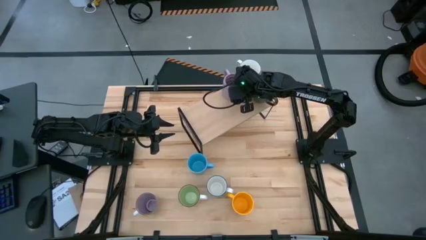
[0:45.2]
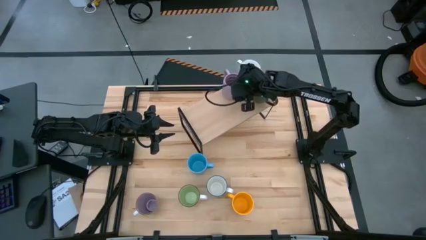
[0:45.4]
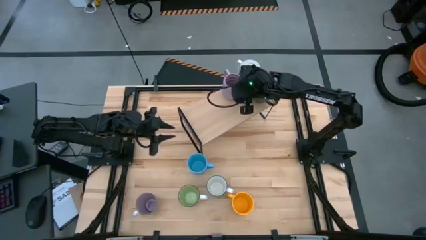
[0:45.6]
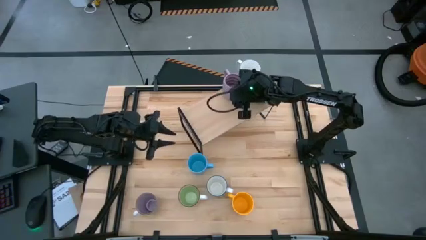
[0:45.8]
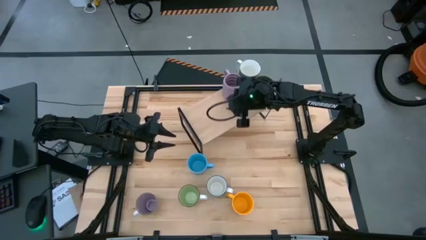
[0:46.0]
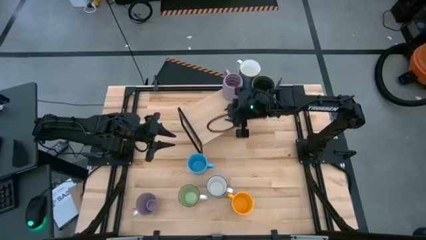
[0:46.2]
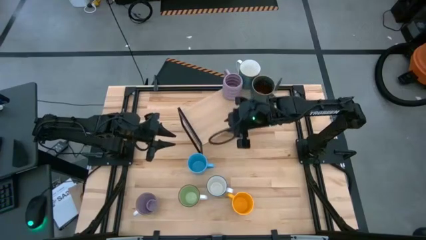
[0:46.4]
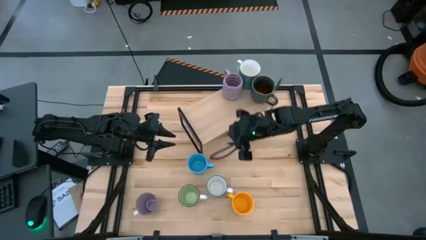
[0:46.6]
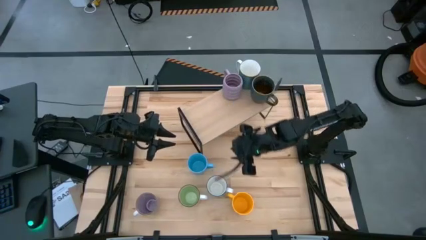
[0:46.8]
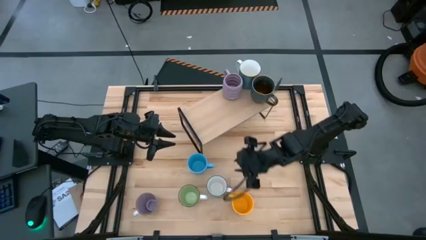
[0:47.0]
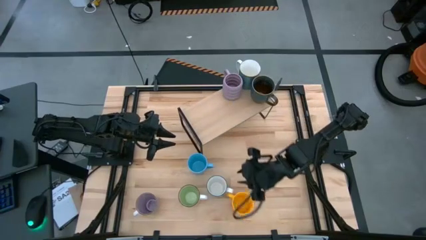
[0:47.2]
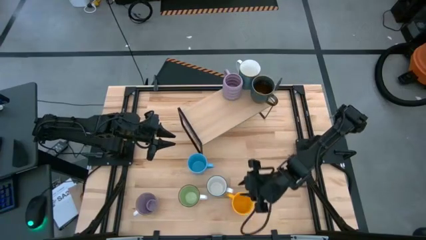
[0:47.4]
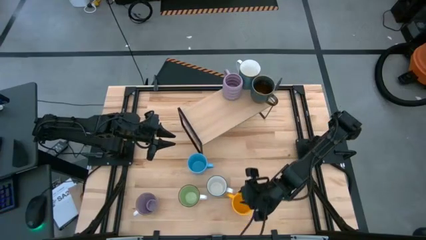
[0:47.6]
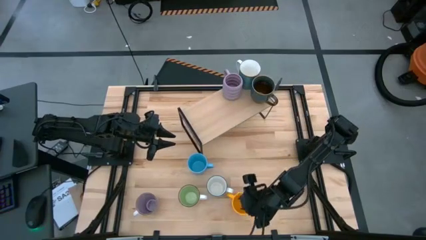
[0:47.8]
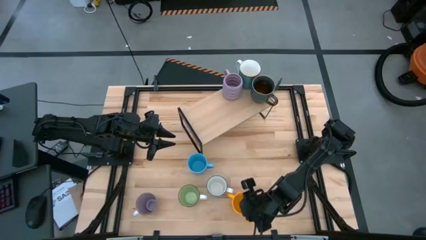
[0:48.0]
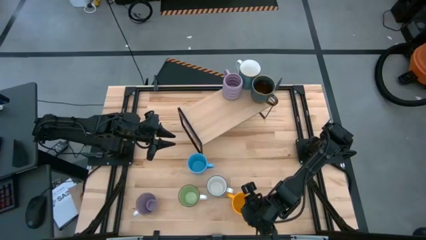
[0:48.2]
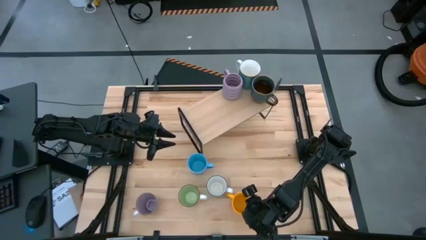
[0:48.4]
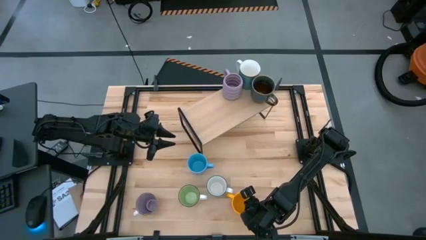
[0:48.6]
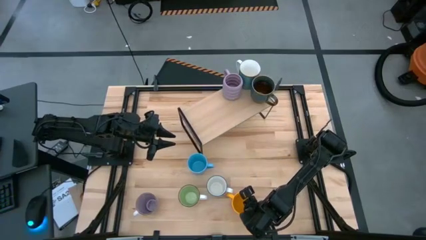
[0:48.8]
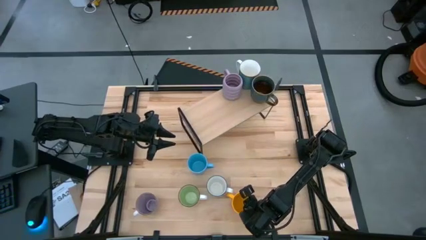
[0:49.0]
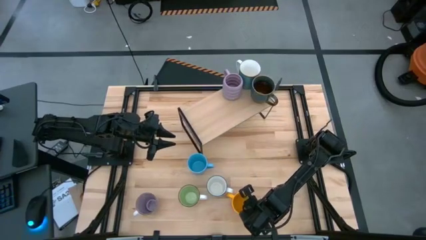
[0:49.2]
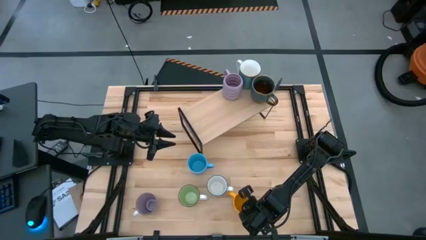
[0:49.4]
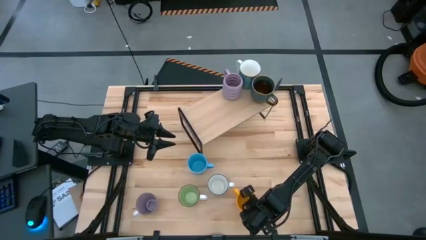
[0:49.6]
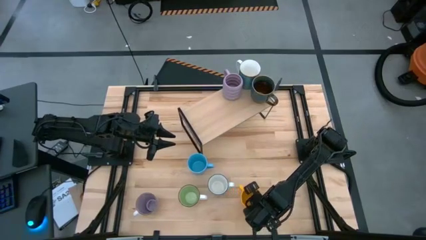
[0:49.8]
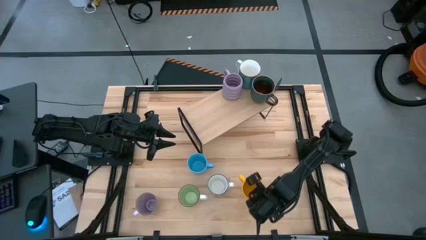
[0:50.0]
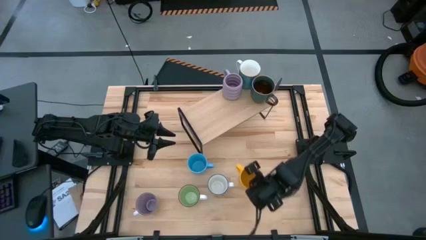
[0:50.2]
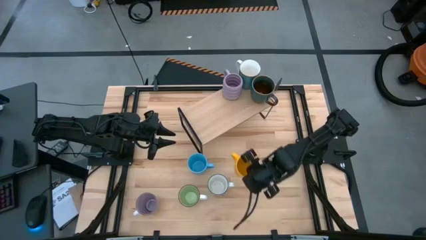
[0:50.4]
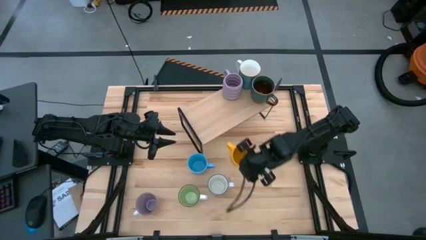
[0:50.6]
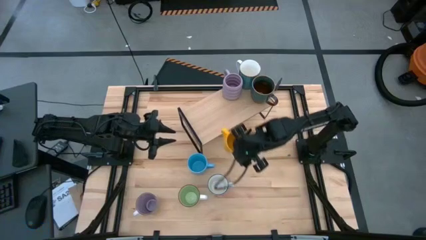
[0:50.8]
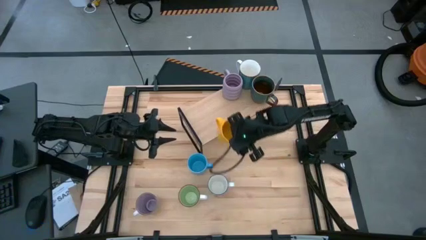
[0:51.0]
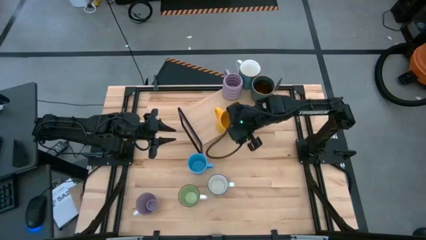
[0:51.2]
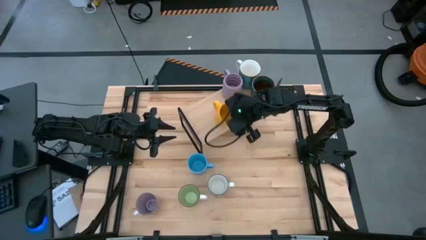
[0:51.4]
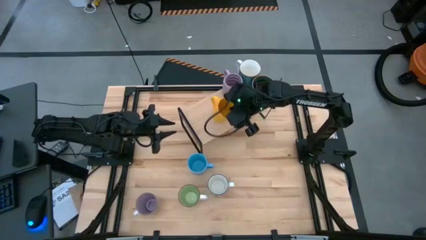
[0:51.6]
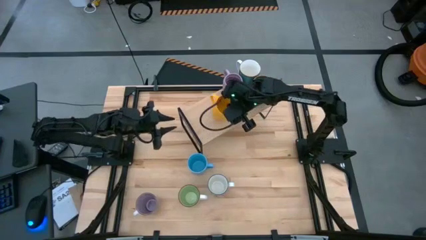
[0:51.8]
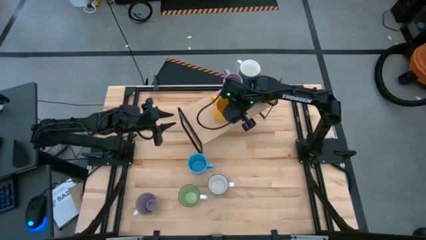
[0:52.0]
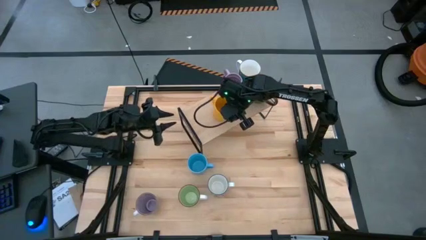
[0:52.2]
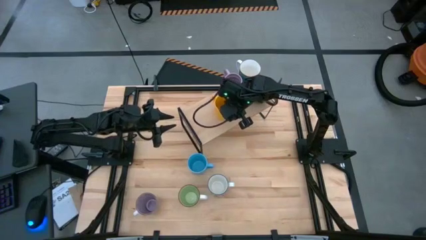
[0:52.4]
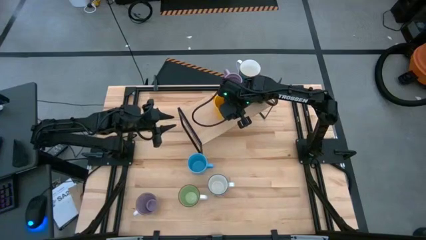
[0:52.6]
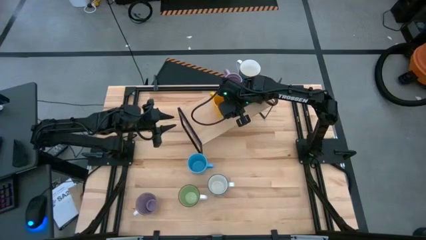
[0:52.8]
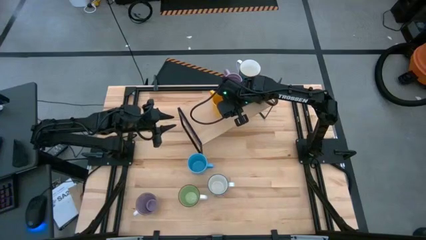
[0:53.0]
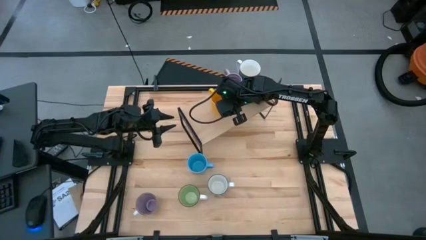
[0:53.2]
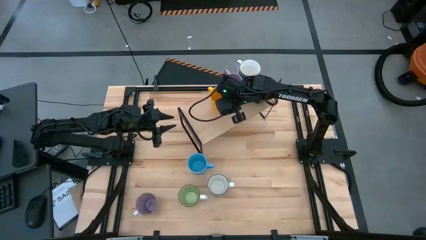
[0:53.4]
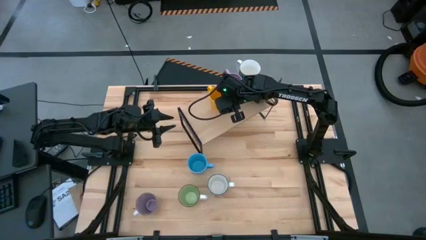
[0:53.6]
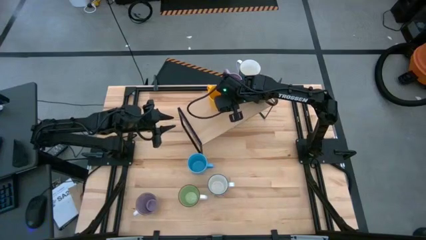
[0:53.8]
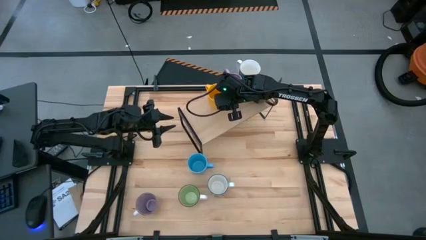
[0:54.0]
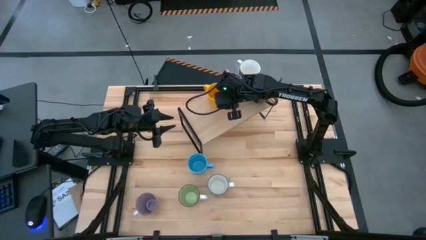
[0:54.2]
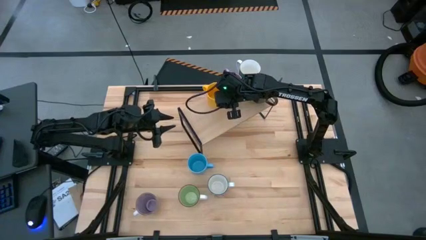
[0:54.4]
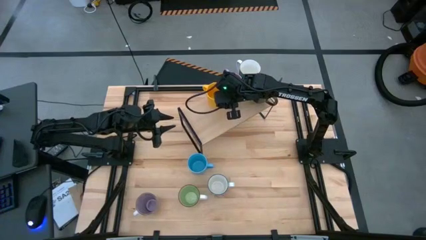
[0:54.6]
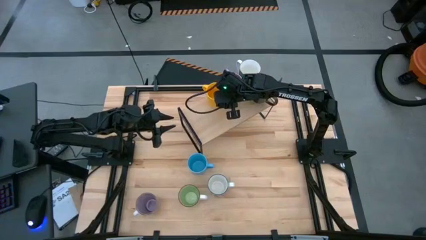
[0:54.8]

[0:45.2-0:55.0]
Task: Place coffee mugs
Put the yellow mug on the shelf

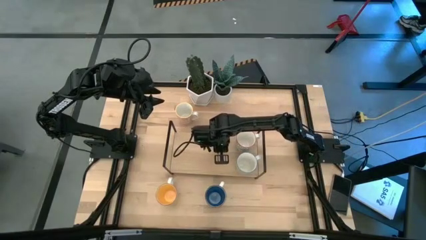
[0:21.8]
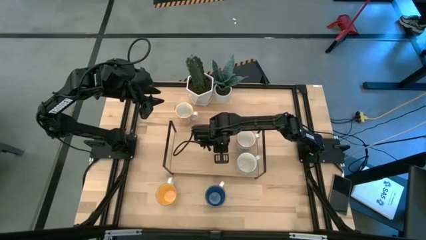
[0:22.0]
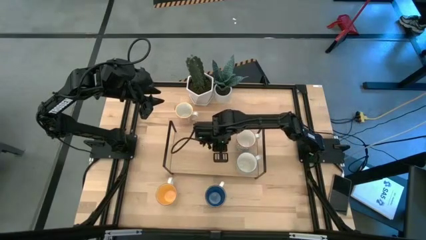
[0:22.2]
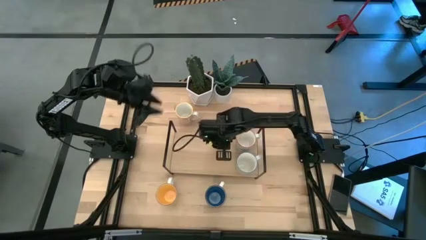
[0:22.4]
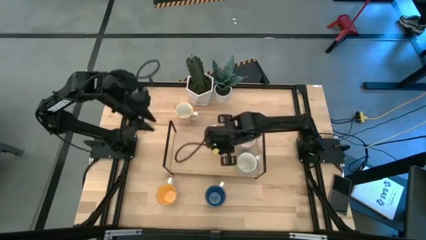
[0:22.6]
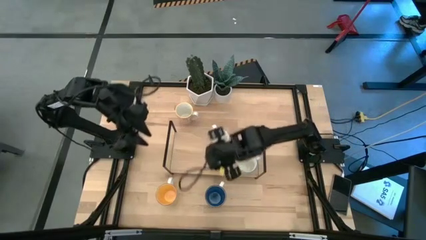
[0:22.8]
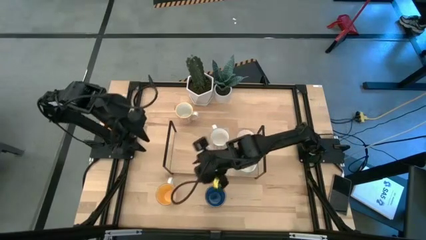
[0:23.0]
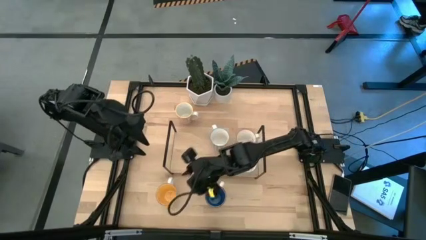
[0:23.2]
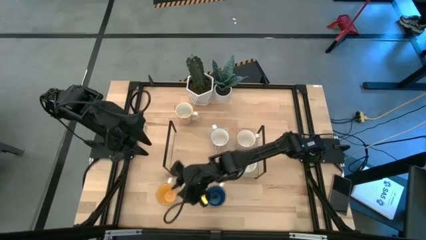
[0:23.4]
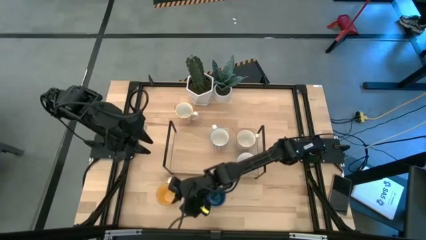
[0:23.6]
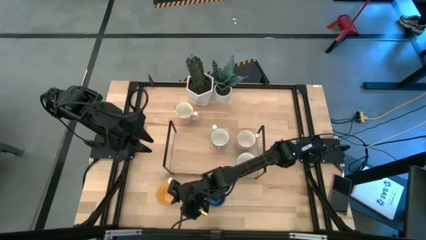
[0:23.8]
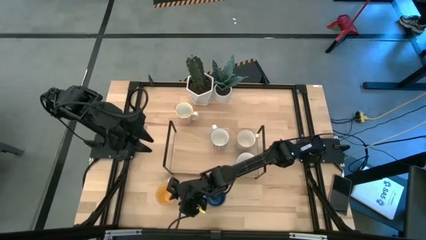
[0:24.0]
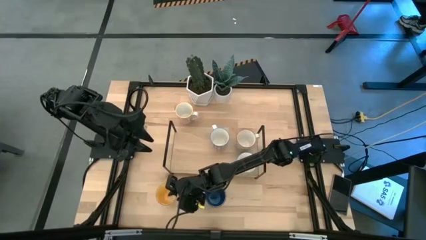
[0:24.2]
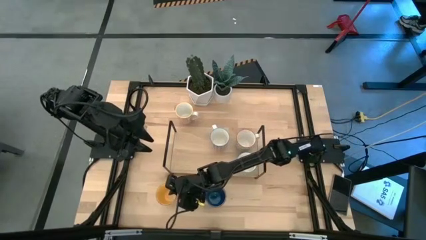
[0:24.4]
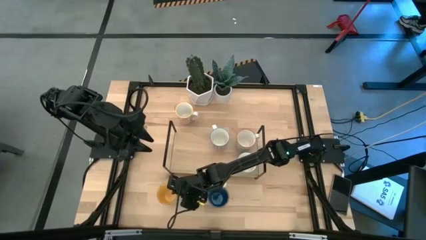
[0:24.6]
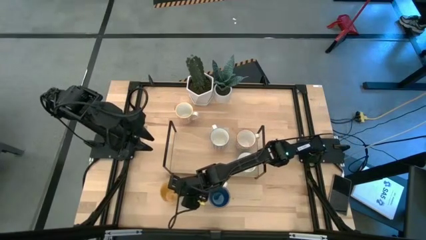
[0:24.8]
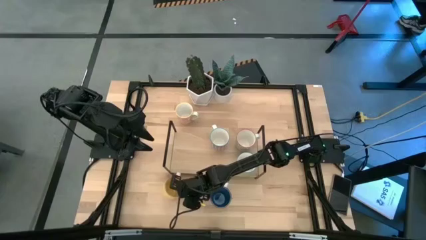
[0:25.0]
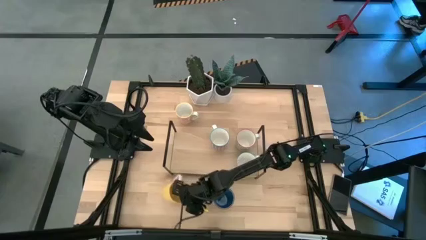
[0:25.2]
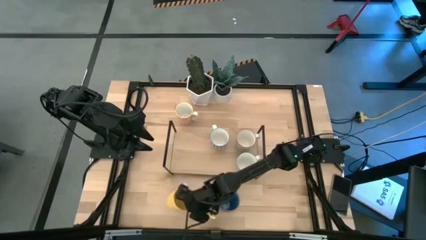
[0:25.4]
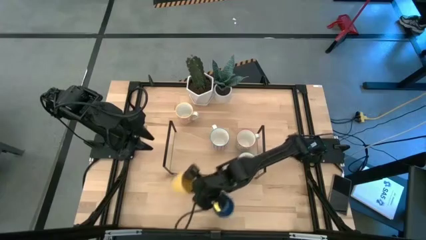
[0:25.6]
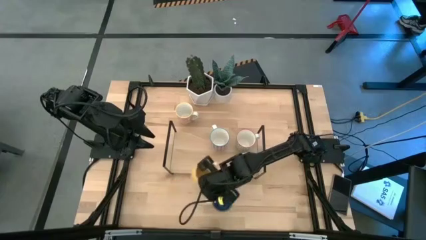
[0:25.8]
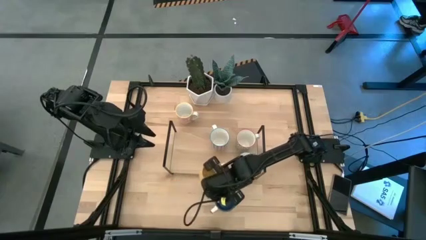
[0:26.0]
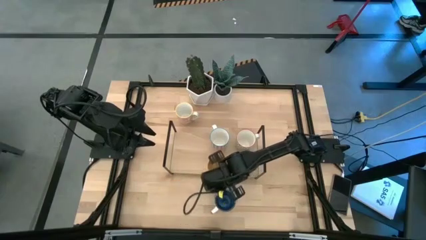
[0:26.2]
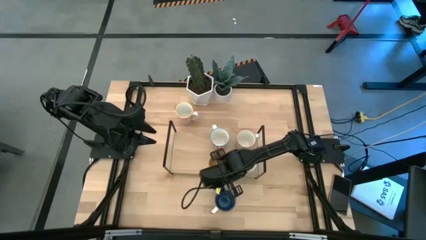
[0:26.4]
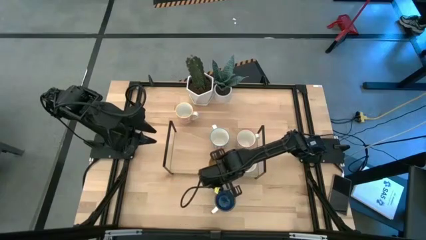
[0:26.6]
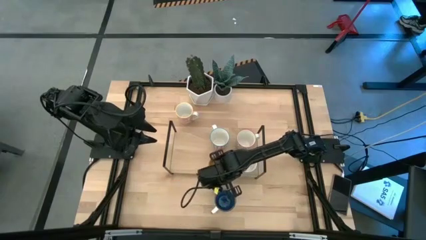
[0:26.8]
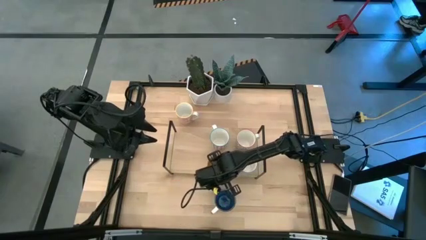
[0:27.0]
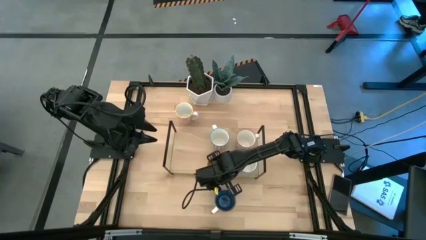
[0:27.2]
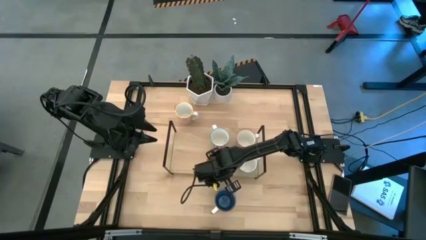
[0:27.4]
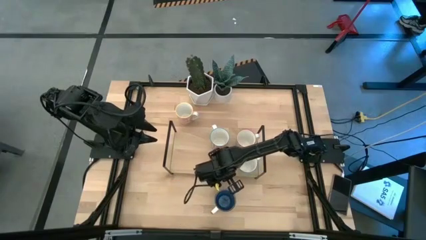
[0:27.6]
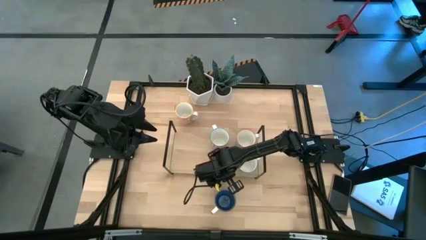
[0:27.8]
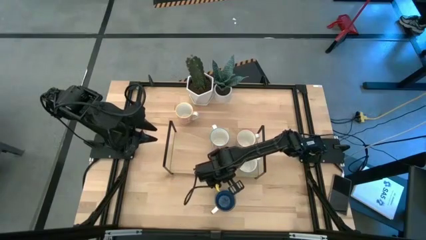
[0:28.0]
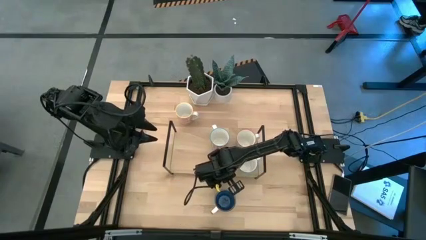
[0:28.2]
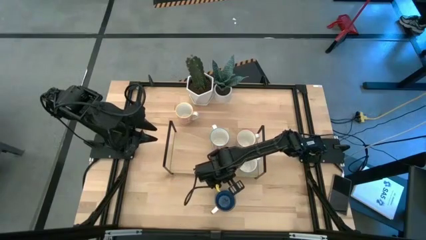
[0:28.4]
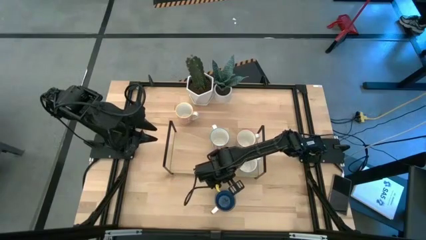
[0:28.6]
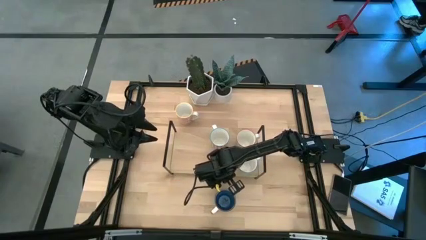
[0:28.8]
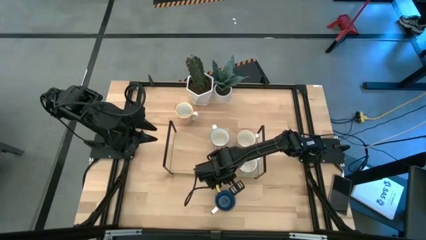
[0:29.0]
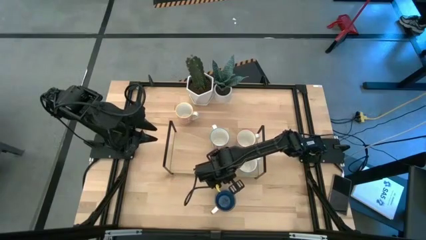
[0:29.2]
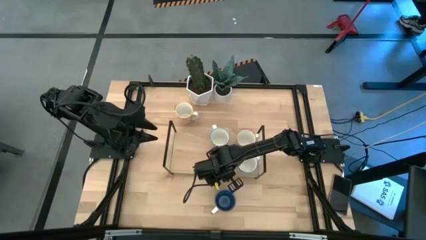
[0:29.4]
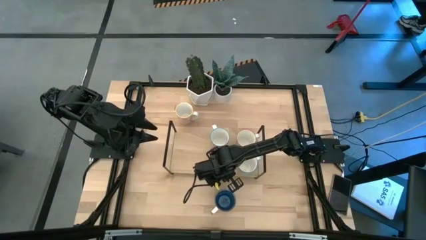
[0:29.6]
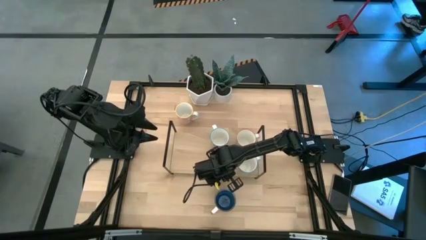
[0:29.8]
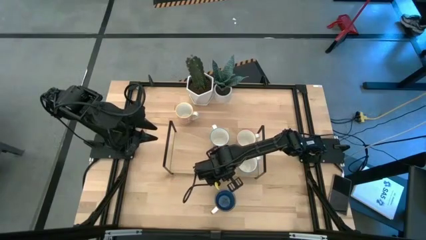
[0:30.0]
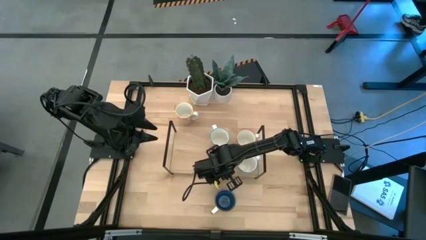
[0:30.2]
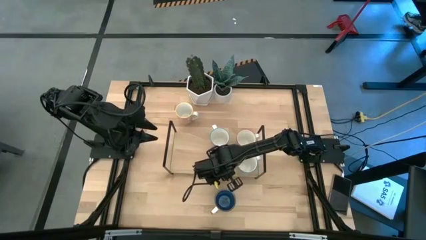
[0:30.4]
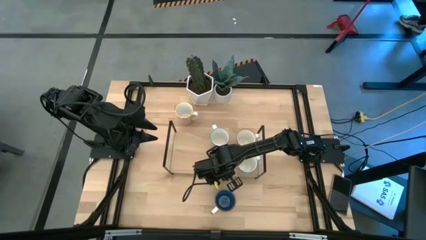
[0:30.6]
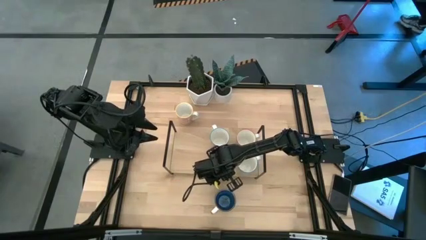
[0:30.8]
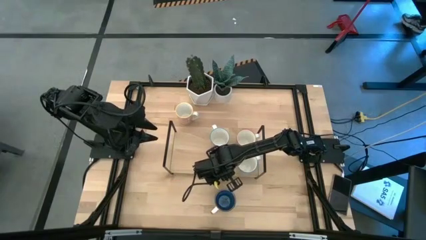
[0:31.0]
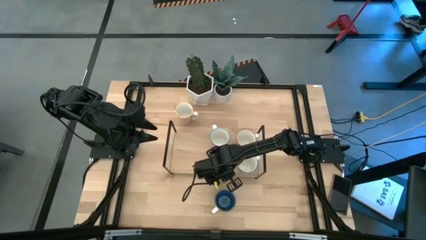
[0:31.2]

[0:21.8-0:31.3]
Task: Place coffee mugs
Put the yellow mug on the shelf
